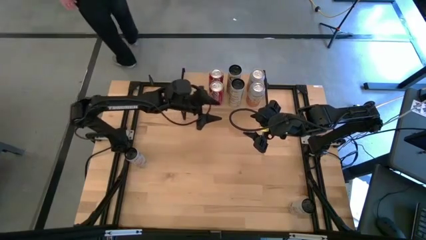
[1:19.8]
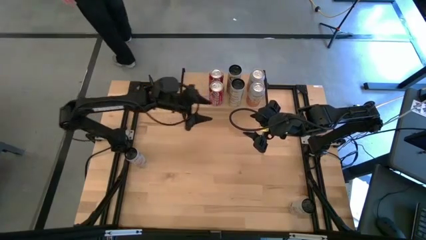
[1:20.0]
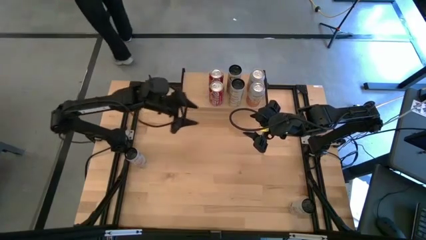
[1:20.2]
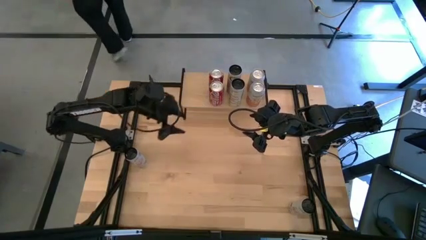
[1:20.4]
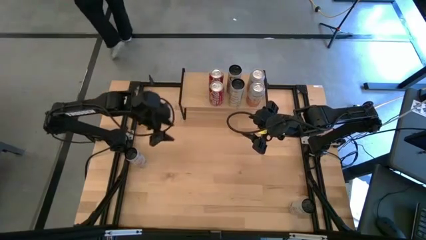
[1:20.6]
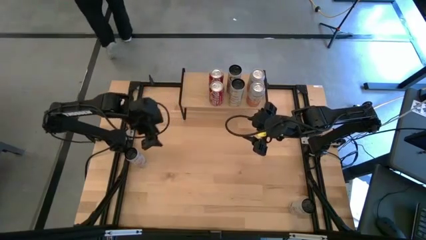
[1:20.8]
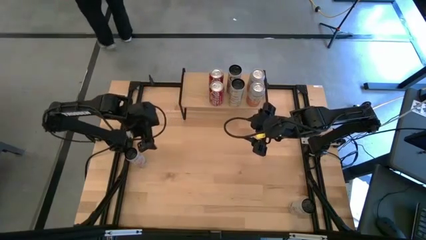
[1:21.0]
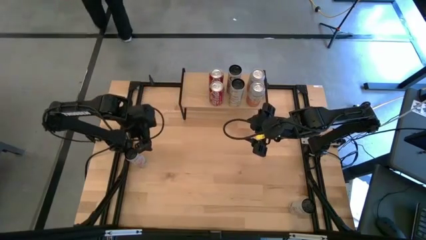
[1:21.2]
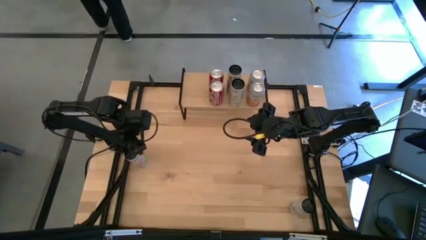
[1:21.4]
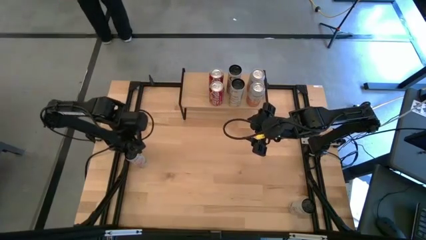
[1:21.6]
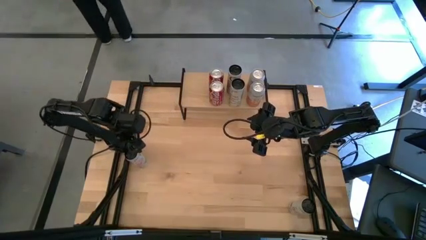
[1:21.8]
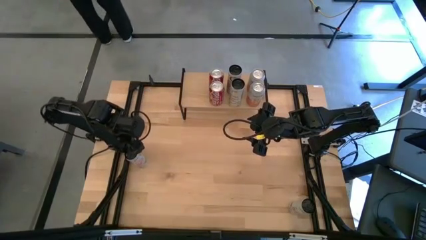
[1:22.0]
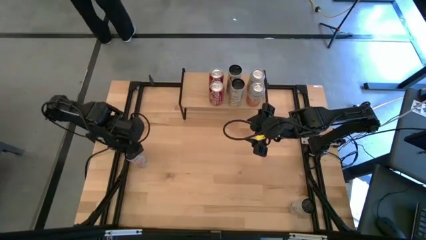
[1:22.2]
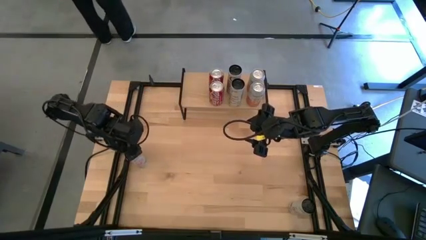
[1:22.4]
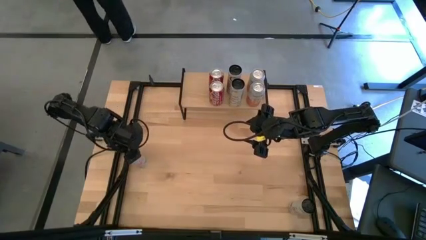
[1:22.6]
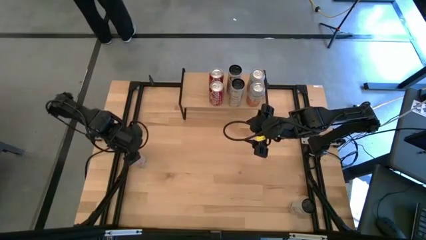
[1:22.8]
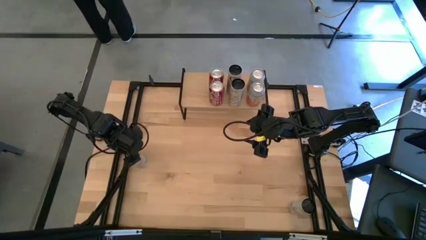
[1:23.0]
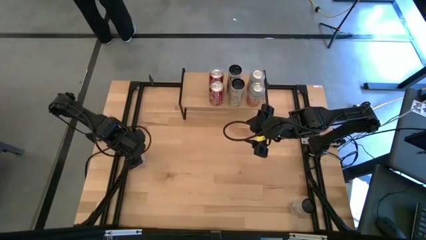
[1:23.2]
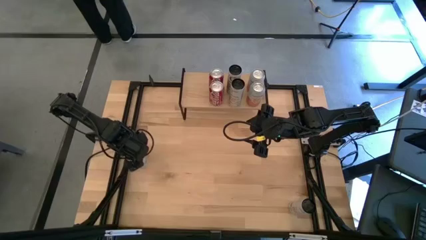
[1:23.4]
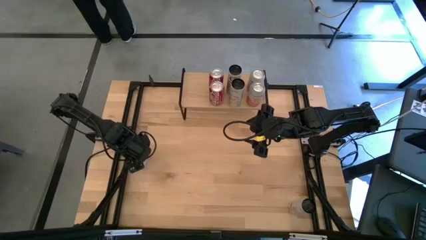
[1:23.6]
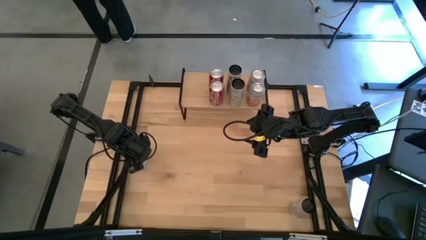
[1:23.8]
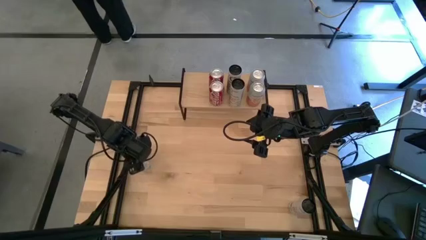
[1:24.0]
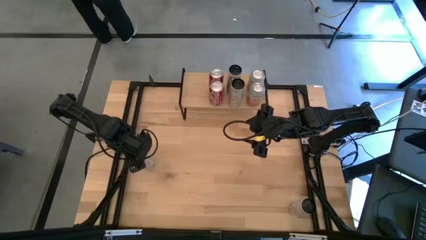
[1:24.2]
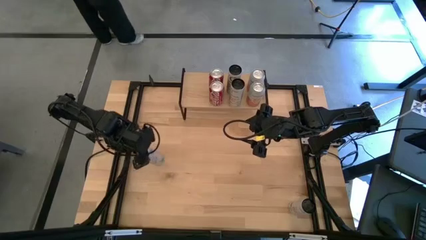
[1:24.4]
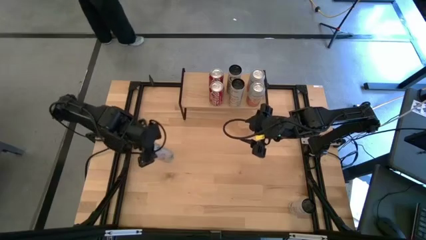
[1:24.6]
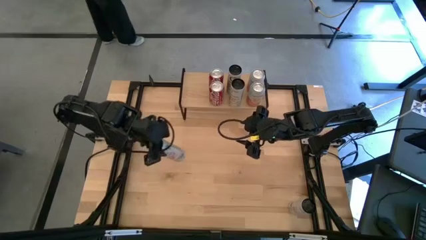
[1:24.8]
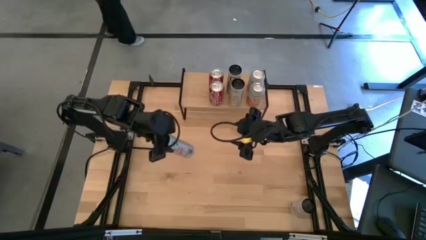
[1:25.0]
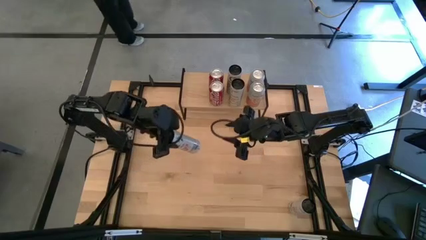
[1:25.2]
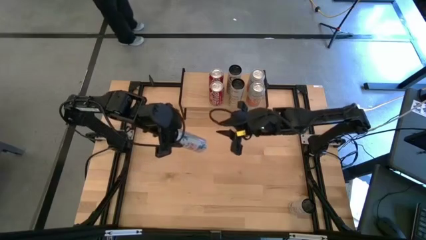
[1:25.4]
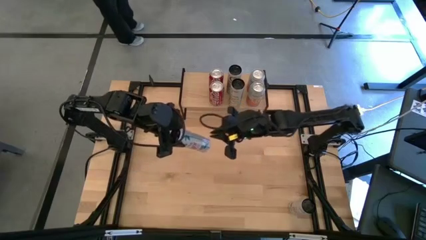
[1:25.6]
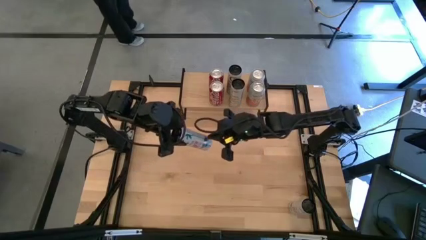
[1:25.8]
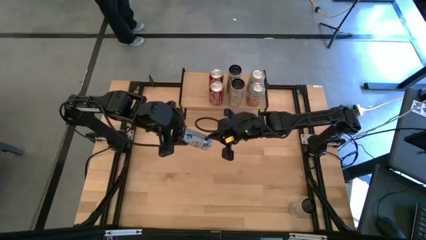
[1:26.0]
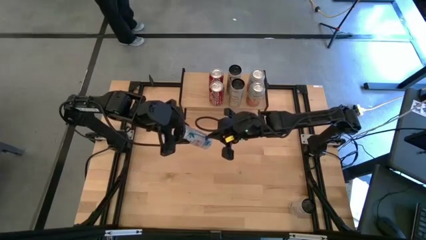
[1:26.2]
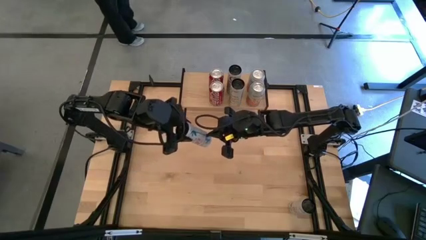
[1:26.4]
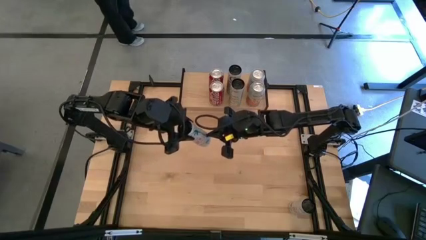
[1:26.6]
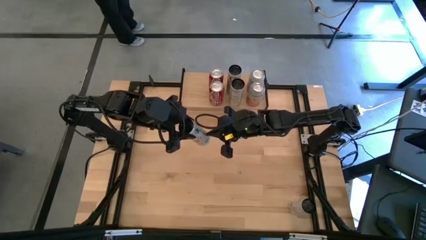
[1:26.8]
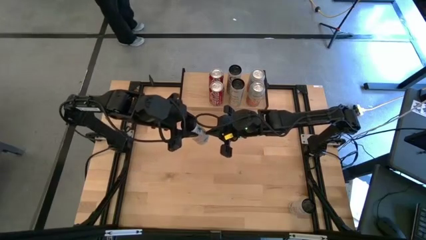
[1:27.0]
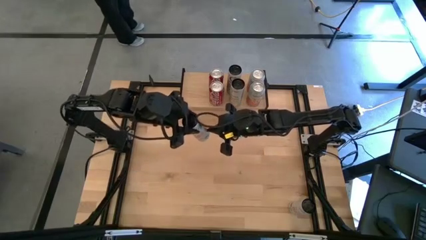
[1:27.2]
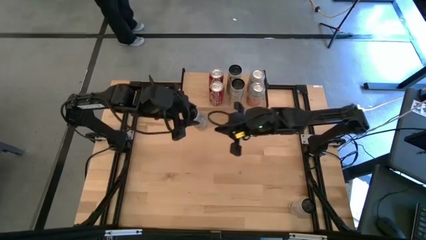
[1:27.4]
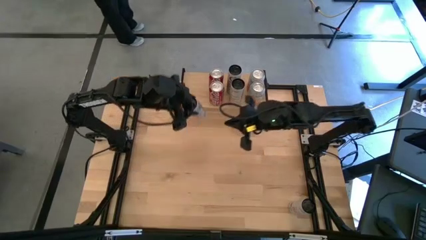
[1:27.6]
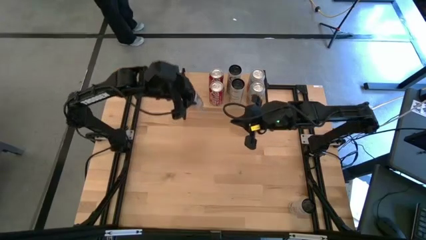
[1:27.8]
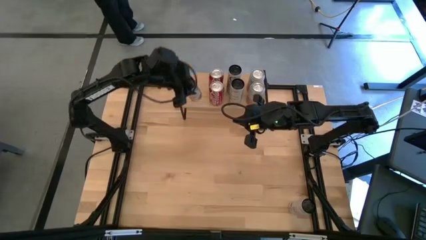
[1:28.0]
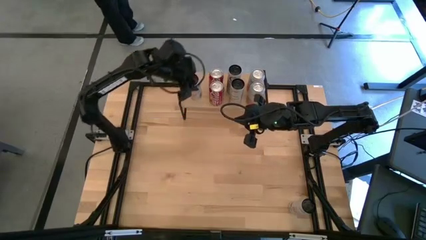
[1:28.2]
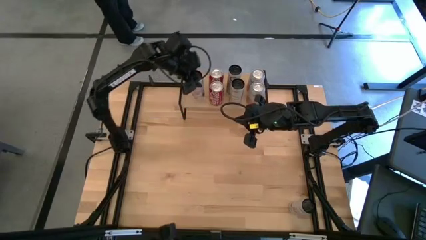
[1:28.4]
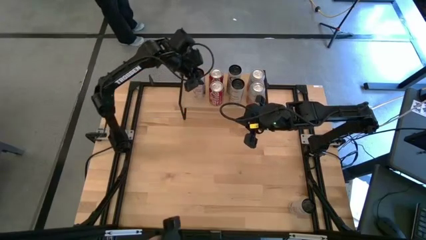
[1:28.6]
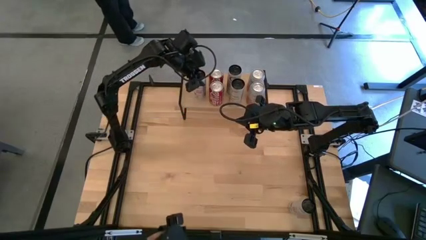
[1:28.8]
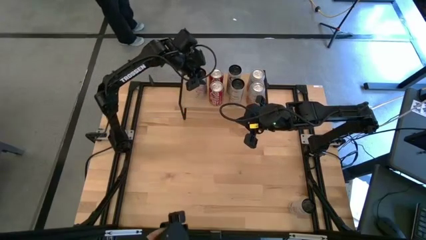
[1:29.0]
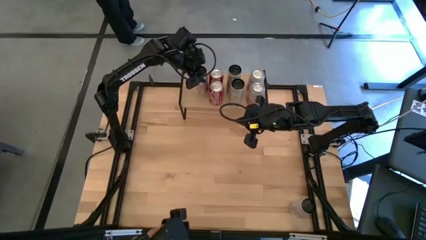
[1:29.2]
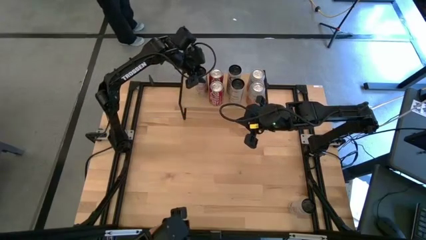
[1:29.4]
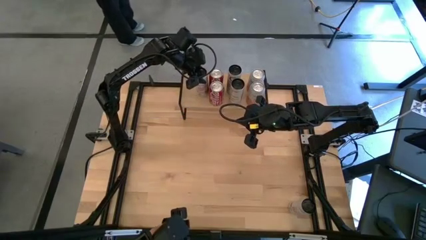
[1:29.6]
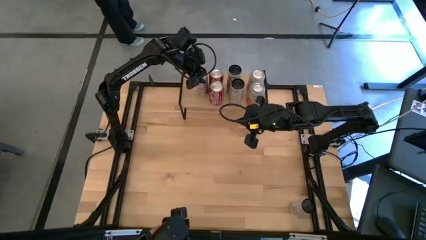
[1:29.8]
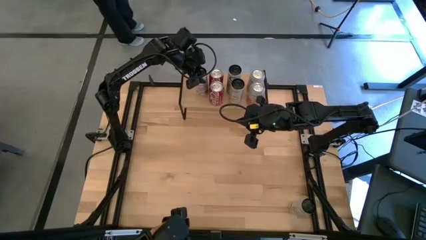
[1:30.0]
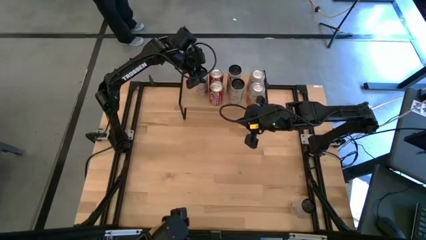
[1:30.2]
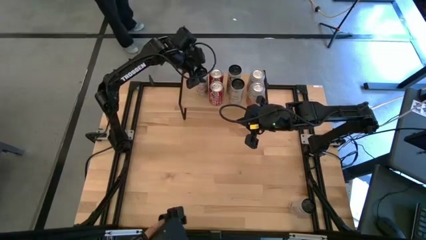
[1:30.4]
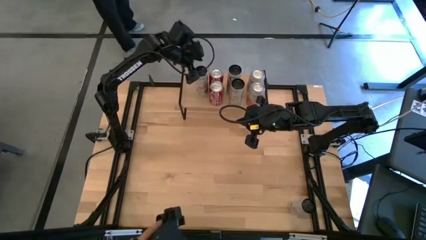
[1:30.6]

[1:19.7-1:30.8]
Task: Place canned beverage on shelf
Put the left white and pink soda can on the shelf

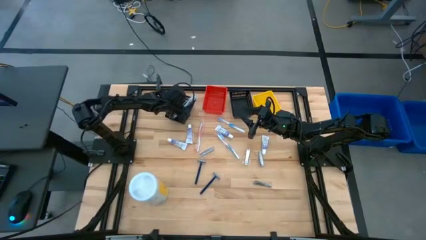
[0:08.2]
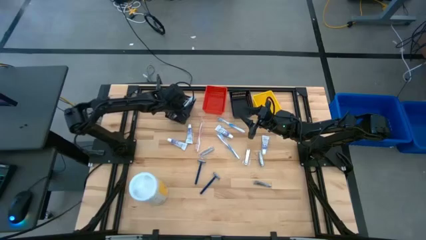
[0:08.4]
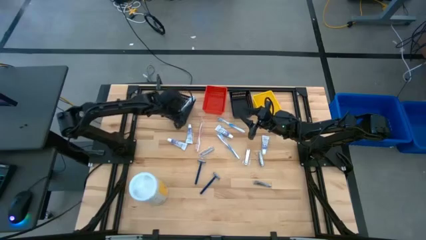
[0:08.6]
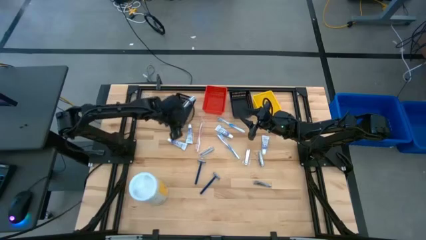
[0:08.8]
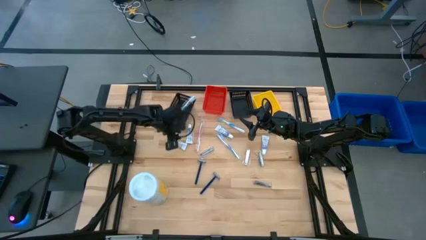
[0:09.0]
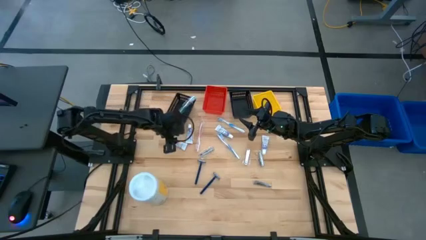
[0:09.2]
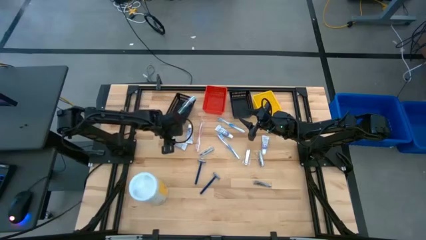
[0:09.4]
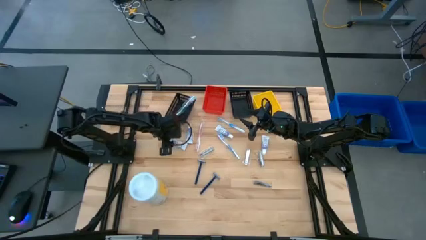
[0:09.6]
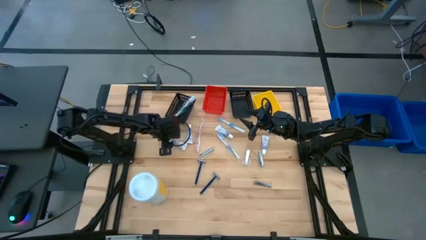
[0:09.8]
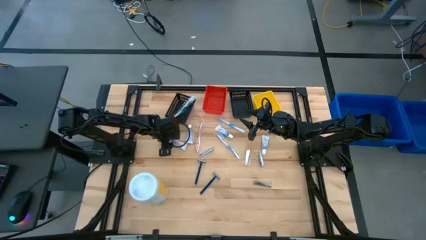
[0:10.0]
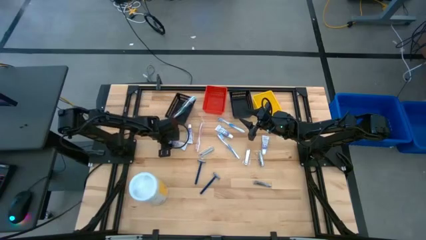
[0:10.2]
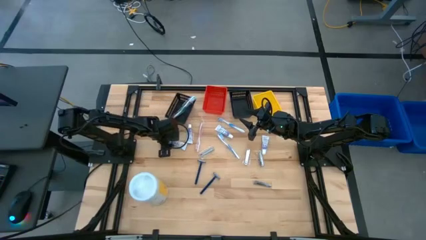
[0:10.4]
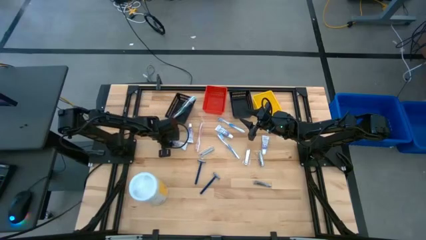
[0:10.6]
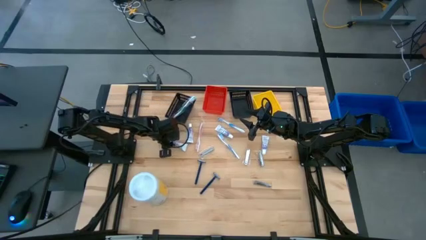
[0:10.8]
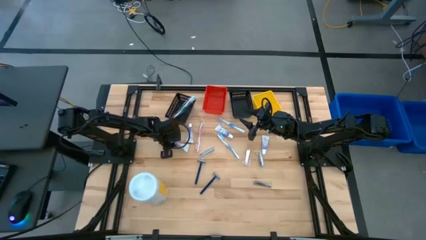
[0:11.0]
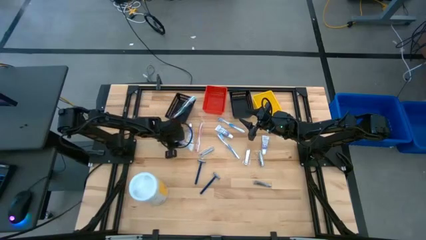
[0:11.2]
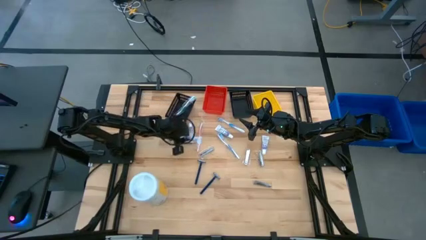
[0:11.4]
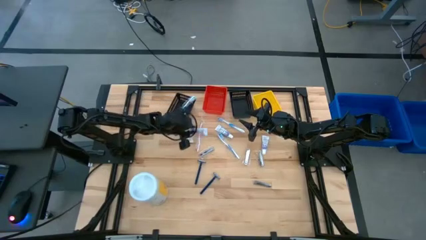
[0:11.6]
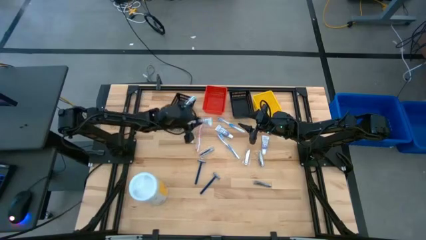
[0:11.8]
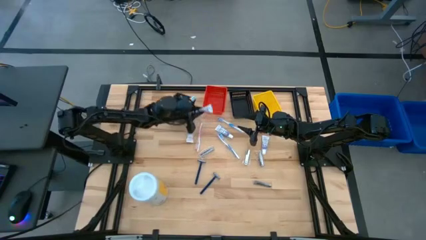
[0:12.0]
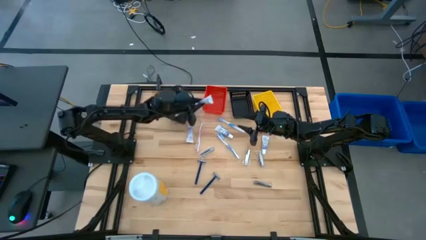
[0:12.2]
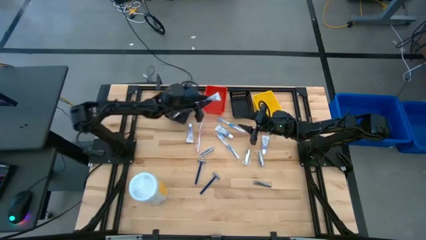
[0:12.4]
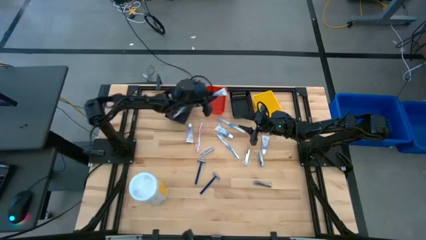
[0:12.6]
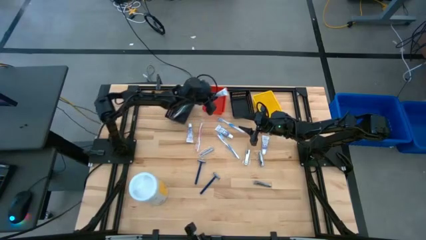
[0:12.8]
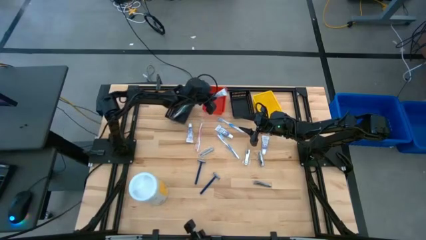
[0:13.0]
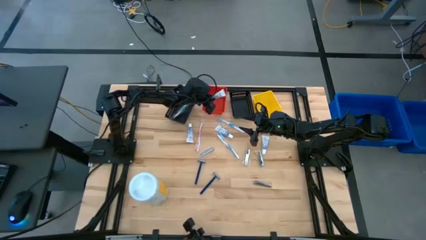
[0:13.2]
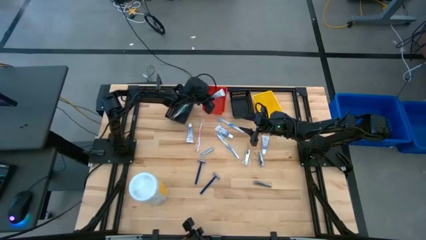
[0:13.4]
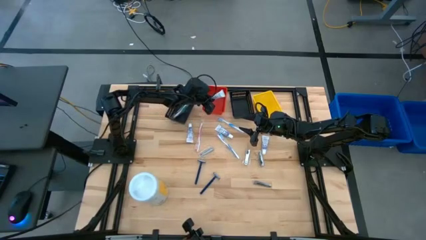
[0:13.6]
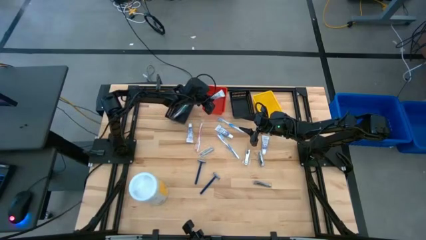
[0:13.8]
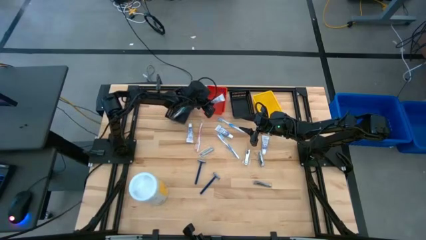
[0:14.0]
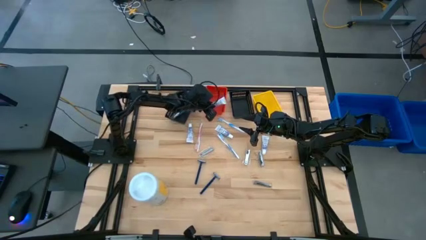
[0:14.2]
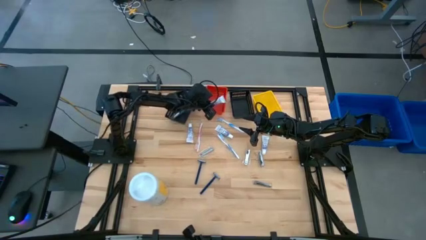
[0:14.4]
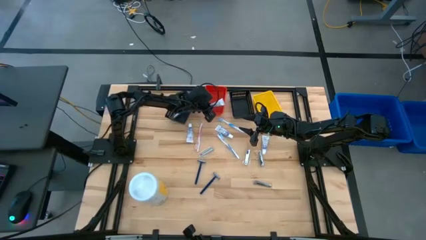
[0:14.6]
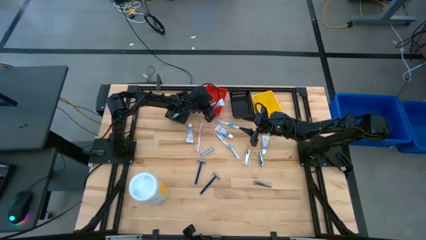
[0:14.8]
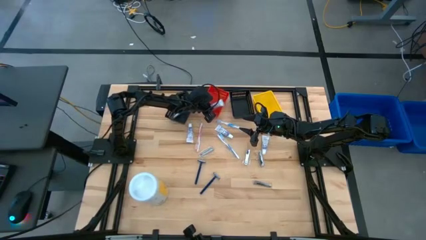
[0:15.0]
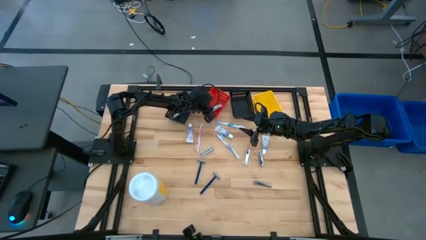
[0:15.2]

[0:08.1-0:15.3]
Task: Pick & Place Travel size toiletries
Put the toothpaste into the red bin
